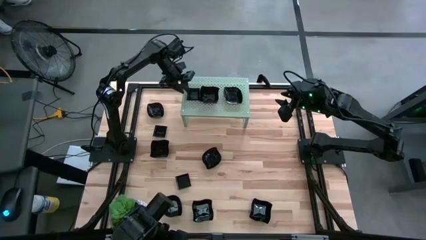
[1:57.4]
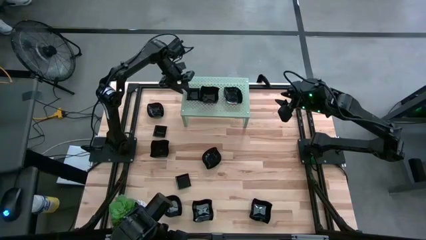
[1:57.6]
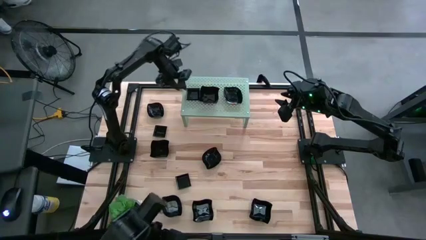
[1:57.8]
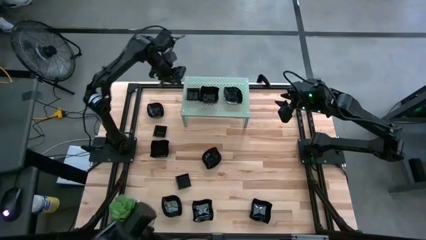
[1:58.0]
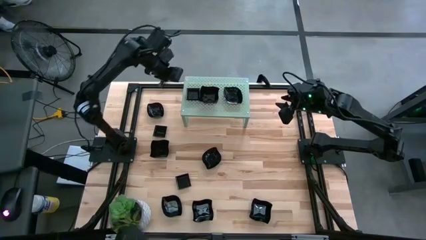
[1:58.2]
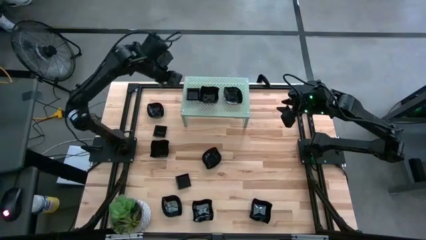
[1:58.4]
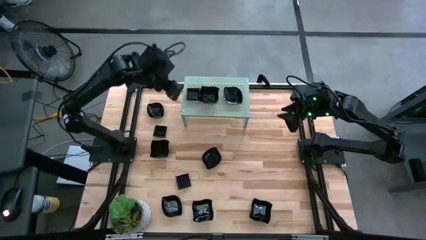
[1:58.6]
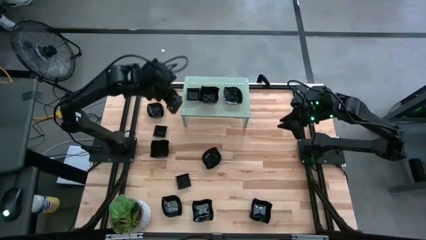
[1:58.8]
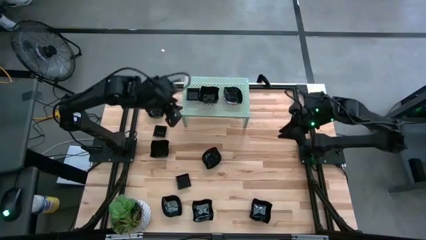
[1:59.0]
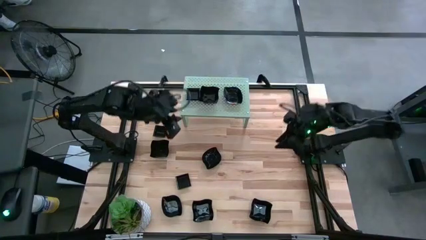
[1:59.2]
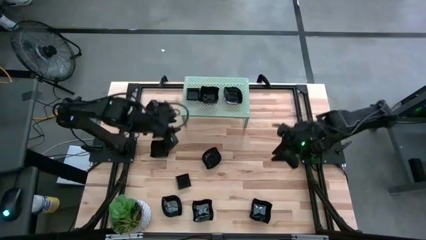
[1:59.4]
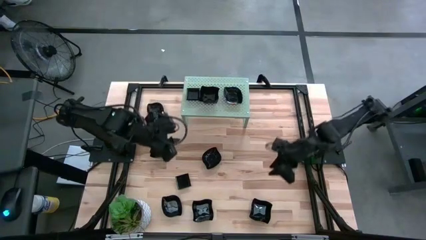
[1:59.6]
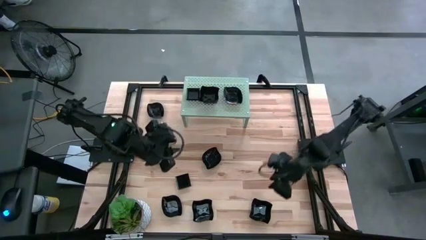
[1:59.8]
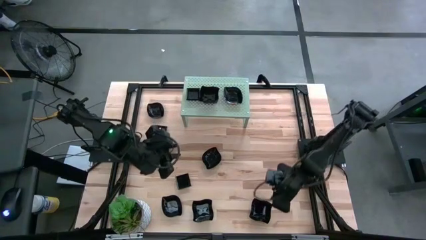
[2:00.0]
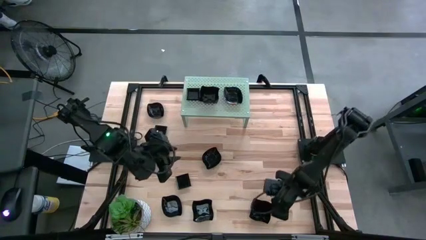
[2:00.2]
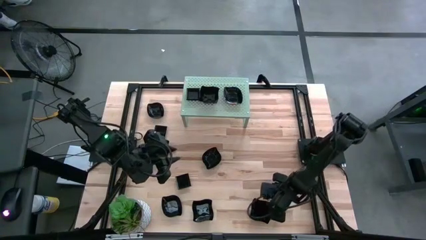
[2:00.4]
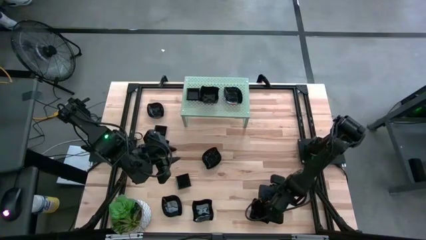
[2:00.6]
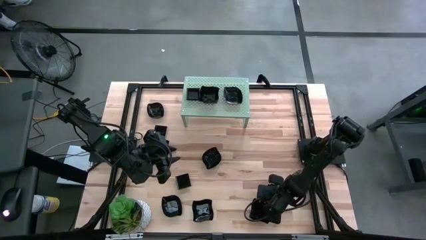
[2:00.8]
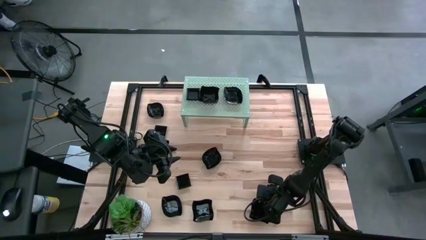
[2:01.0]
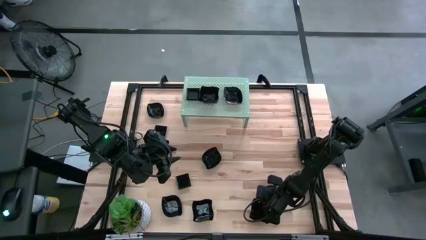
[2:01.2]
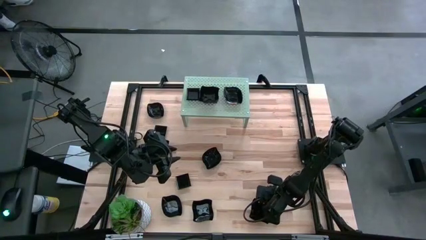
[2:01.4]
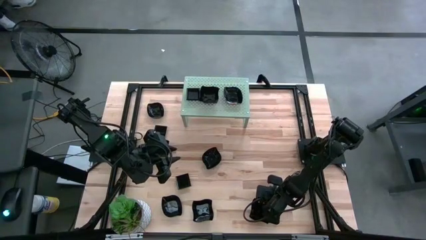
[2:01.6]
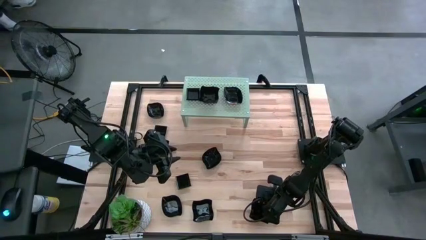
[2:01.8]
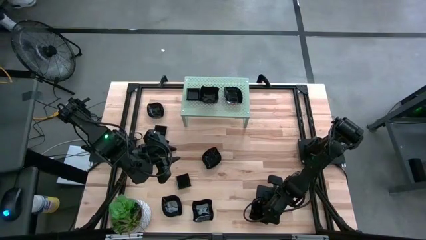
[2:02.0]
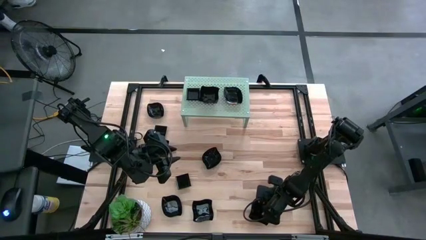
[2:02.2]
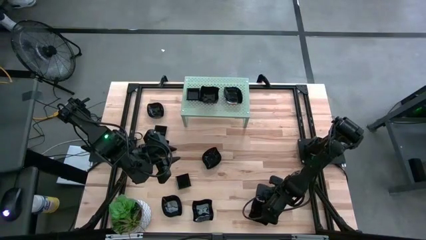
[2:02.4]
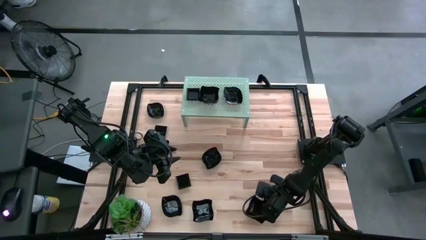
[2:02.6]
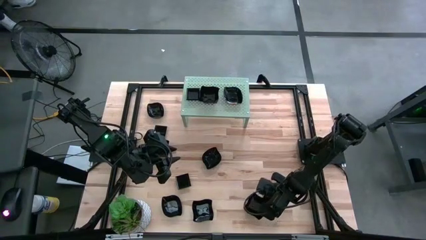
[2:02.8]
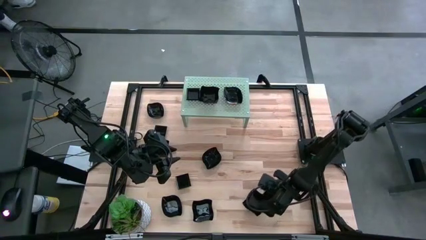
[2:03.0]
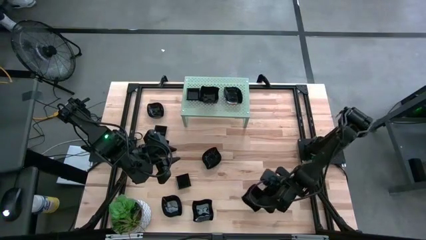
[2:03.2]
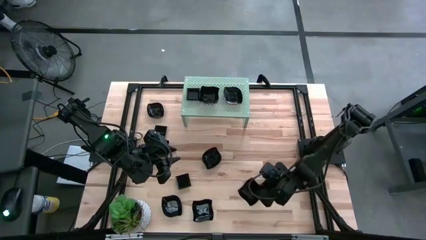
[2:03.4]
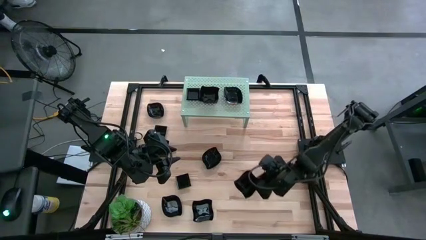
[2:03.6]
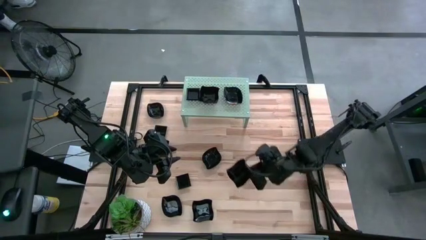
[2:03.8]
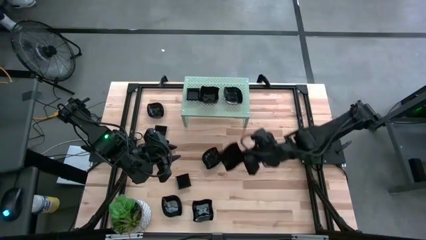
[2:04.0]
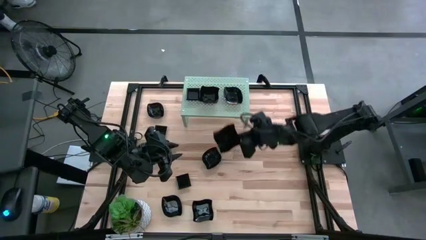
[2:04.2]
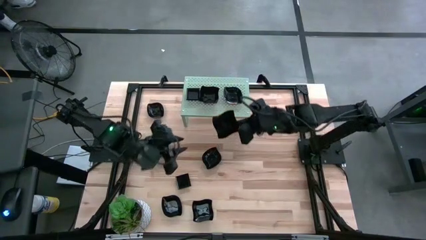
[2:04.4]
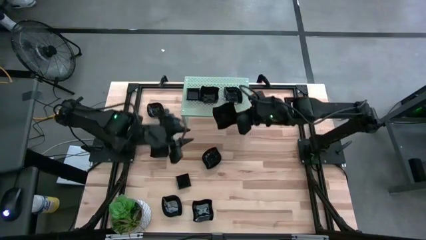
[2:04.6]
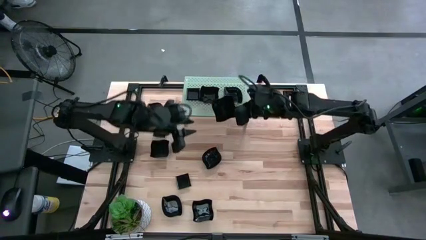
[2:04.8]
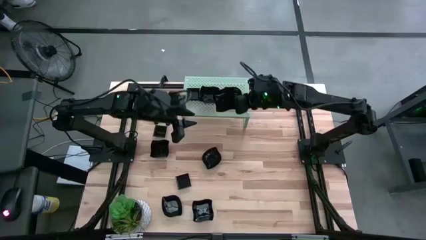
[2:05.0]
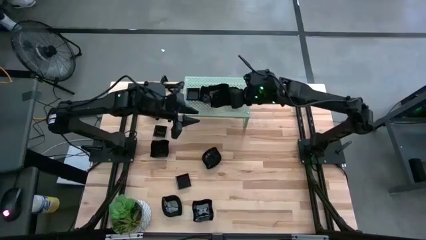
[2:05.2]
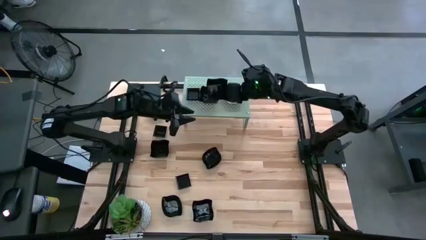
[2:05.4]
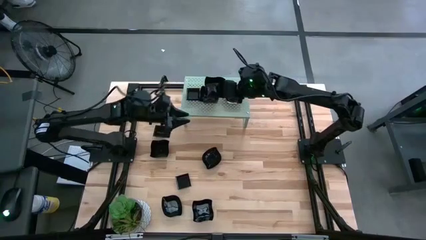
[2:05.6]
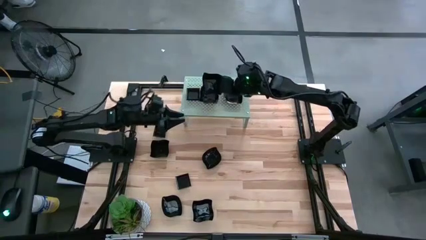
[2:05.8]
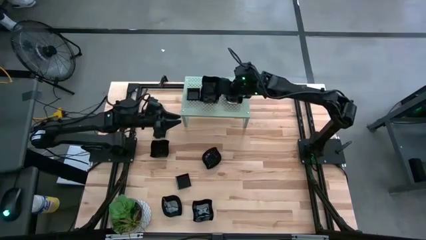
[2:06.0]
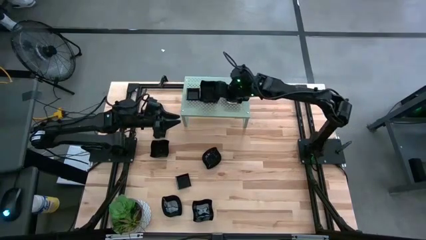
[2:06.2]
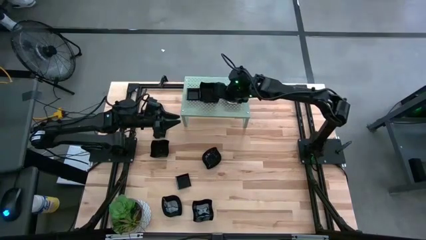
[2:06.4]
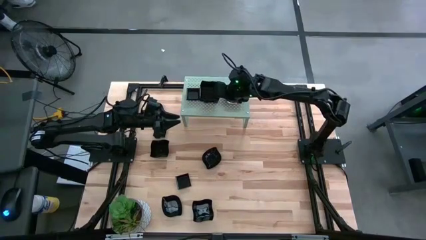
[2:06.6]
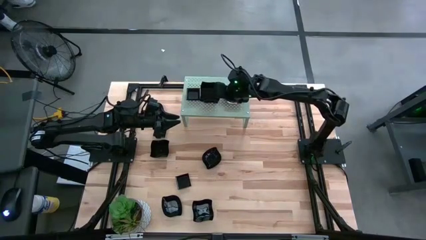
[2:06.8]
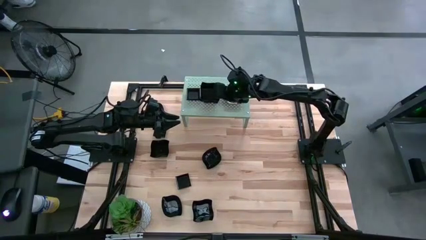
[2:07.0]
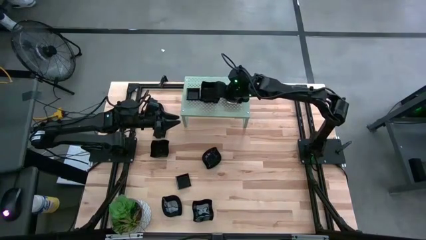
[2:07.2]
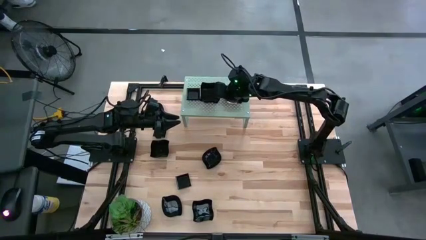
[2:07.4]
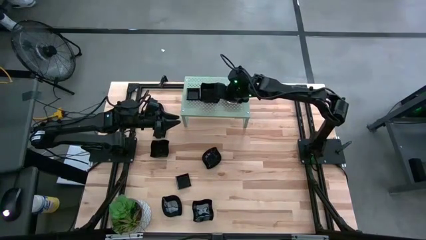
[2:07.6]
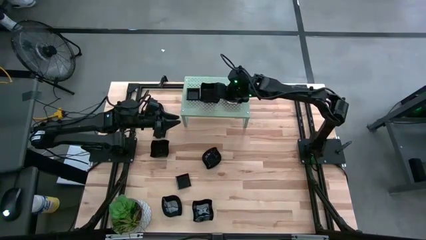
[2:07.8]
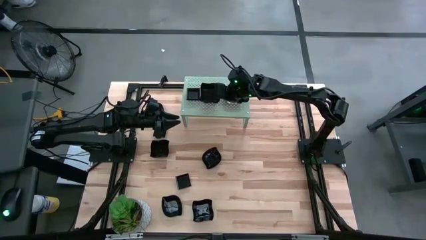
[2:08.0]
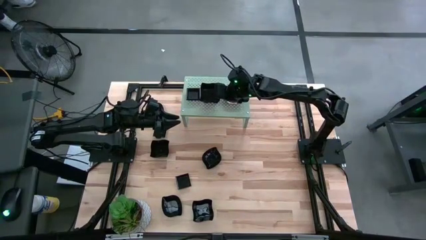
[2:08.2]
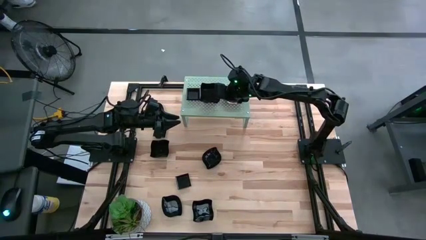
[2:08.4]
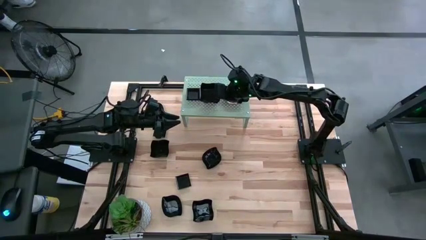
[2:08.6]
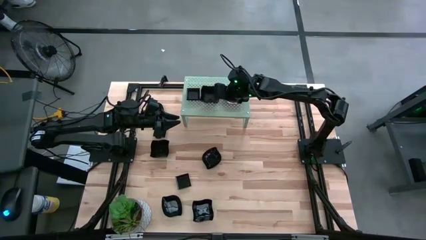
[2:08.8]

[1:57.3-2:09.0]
Task: Pick & Place Mini shaped plates
Stack the wave square shaped plate on top of the wave square shaped plate on the shelf
